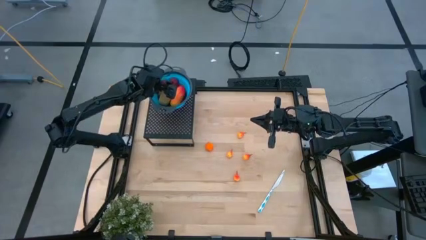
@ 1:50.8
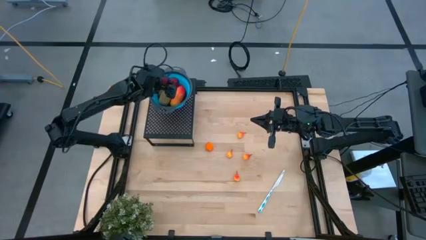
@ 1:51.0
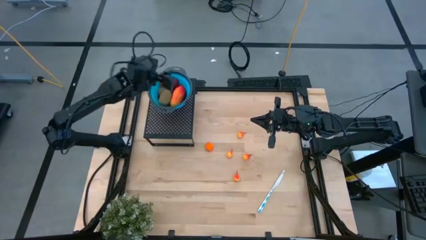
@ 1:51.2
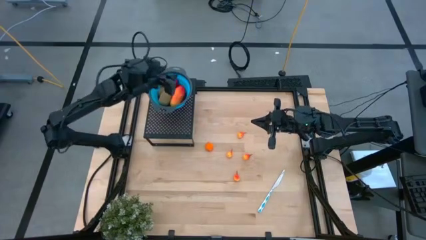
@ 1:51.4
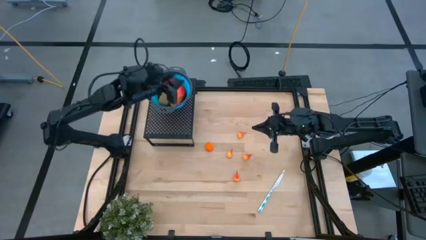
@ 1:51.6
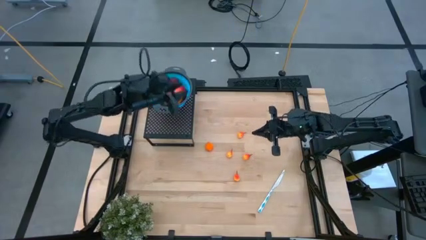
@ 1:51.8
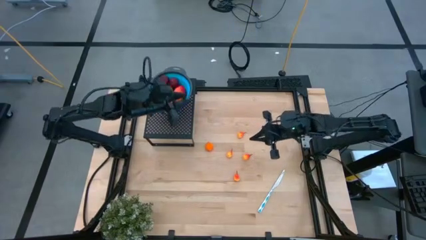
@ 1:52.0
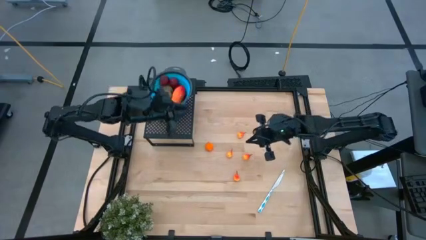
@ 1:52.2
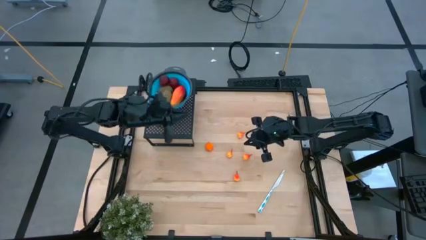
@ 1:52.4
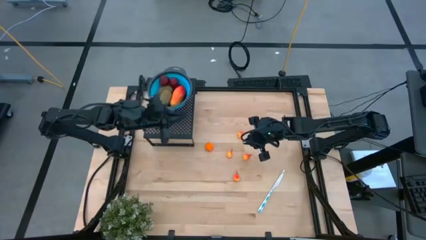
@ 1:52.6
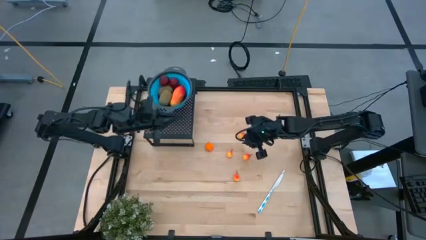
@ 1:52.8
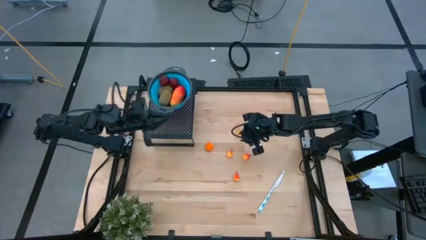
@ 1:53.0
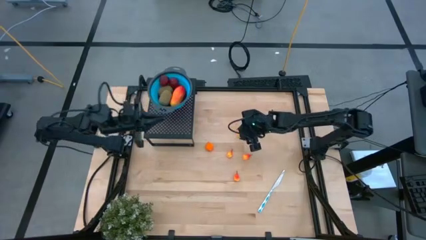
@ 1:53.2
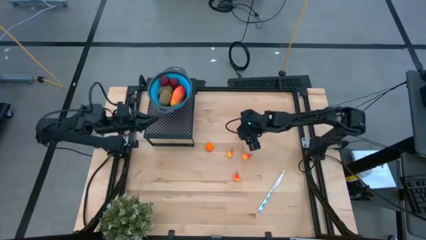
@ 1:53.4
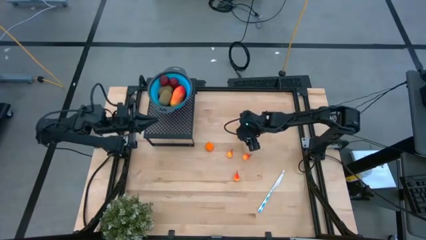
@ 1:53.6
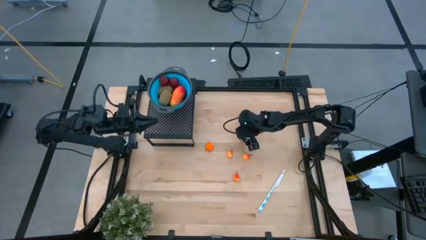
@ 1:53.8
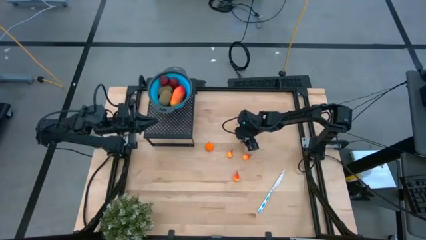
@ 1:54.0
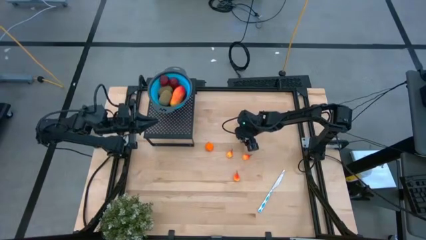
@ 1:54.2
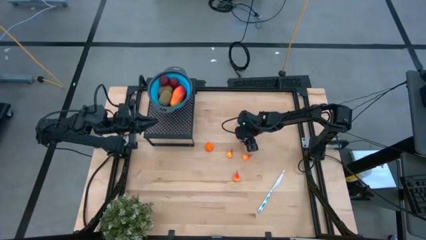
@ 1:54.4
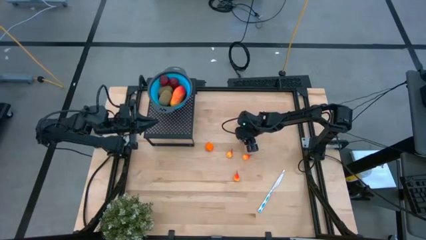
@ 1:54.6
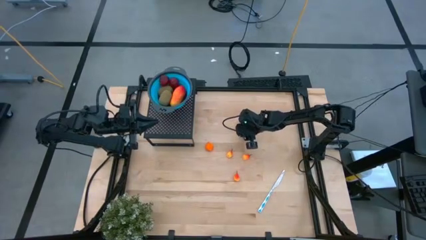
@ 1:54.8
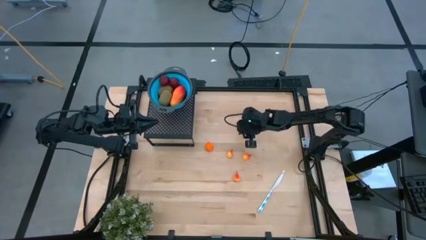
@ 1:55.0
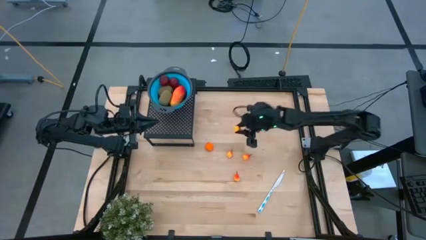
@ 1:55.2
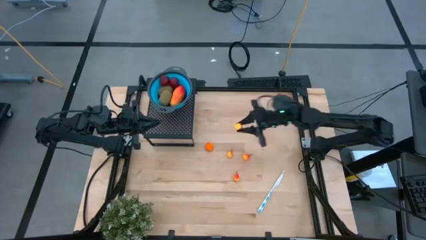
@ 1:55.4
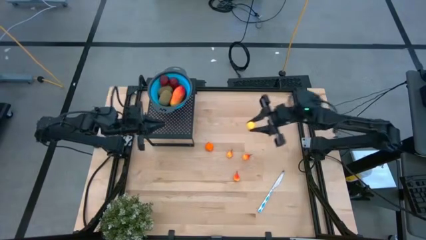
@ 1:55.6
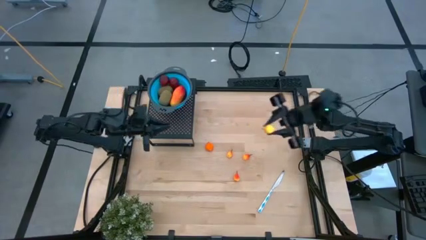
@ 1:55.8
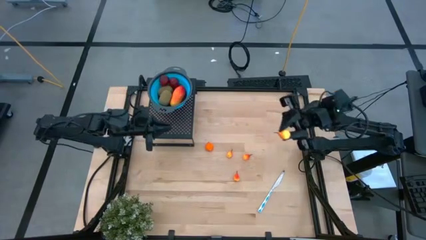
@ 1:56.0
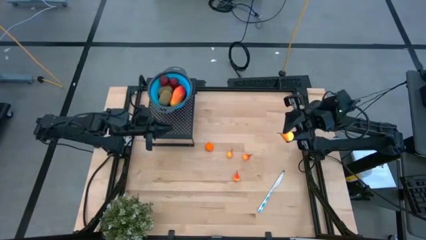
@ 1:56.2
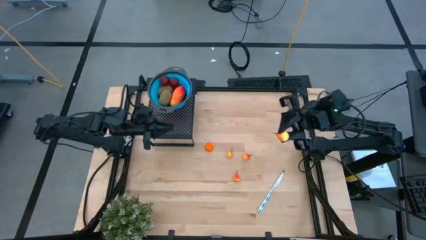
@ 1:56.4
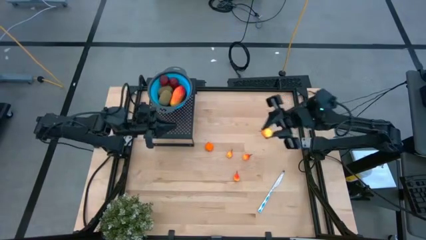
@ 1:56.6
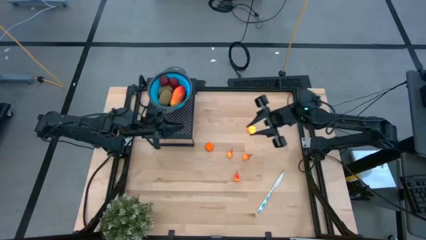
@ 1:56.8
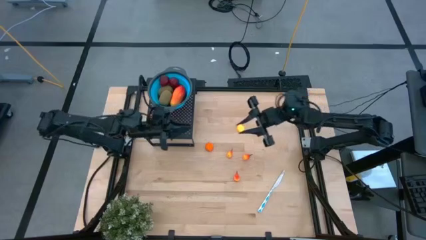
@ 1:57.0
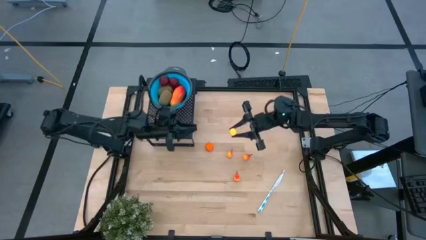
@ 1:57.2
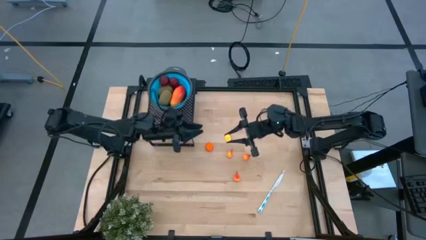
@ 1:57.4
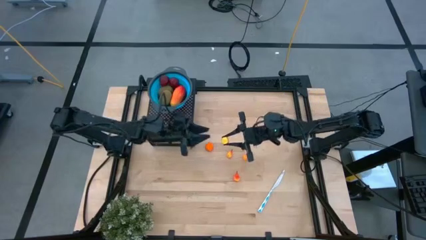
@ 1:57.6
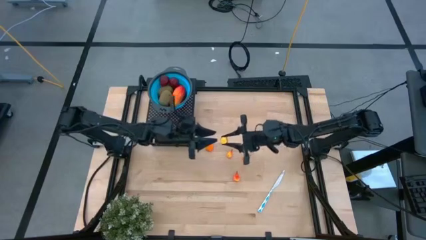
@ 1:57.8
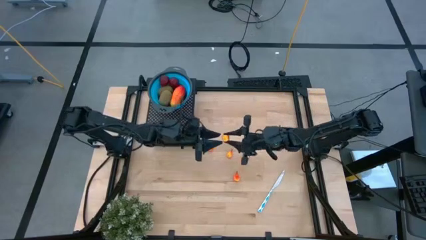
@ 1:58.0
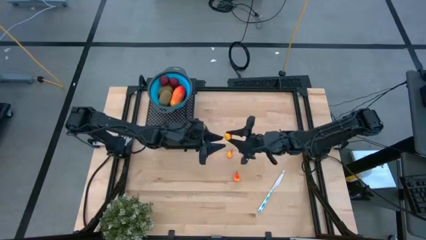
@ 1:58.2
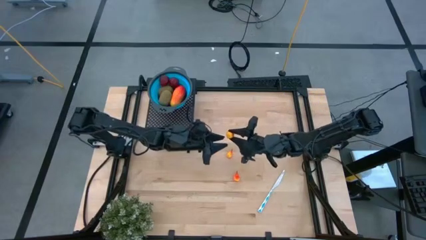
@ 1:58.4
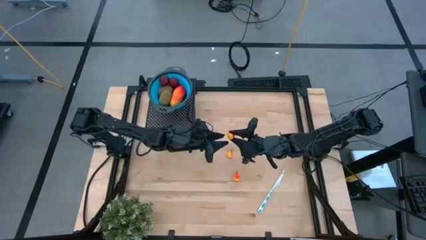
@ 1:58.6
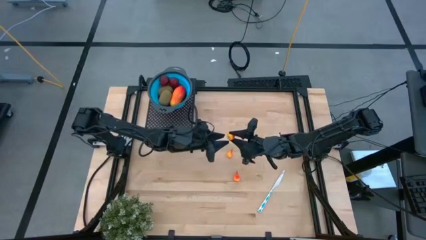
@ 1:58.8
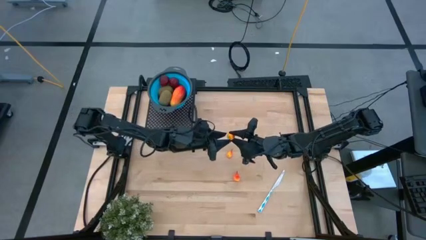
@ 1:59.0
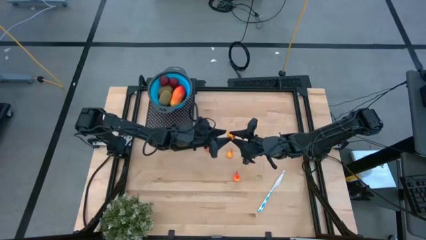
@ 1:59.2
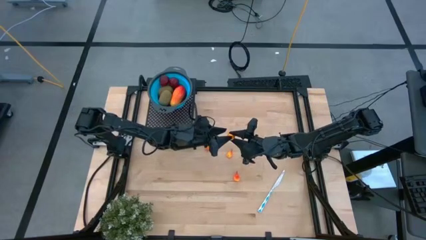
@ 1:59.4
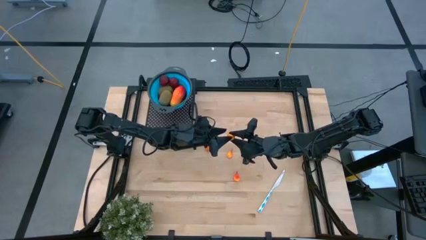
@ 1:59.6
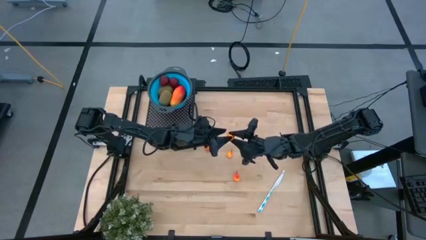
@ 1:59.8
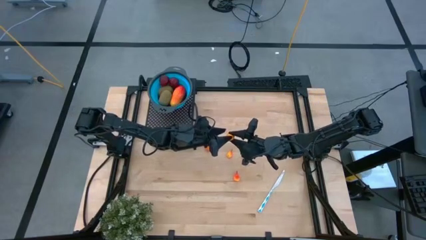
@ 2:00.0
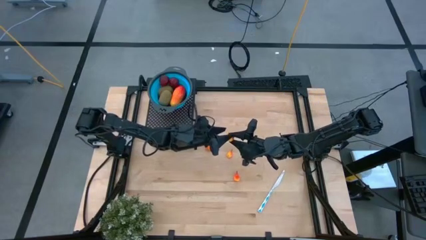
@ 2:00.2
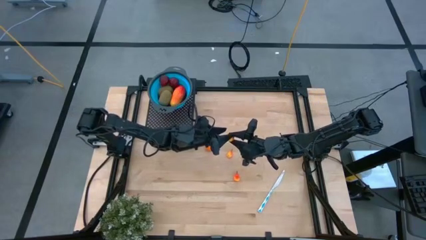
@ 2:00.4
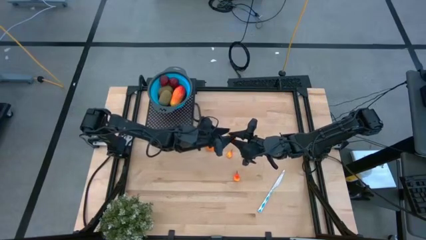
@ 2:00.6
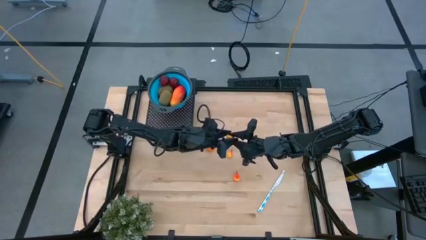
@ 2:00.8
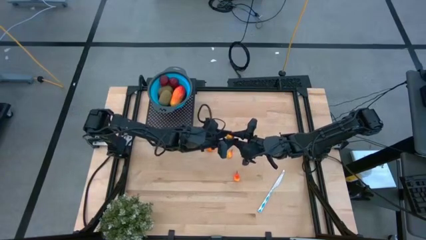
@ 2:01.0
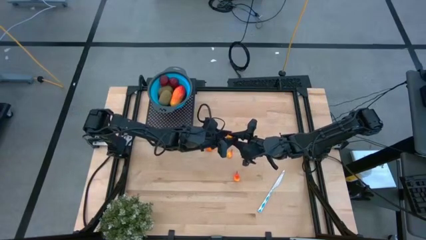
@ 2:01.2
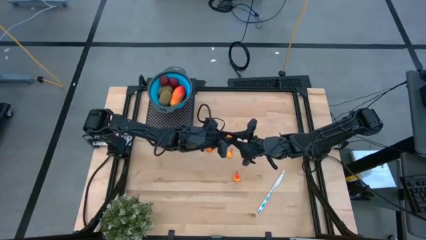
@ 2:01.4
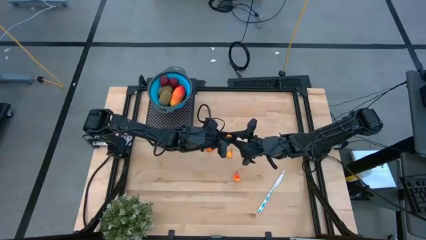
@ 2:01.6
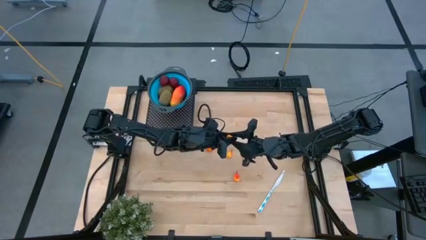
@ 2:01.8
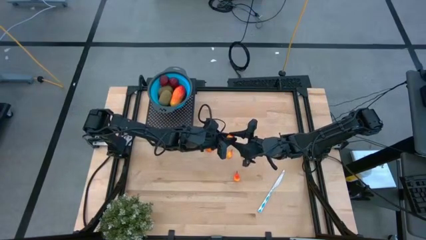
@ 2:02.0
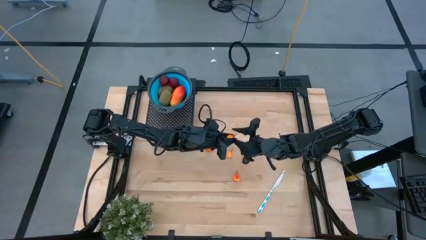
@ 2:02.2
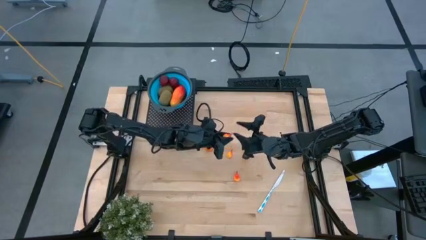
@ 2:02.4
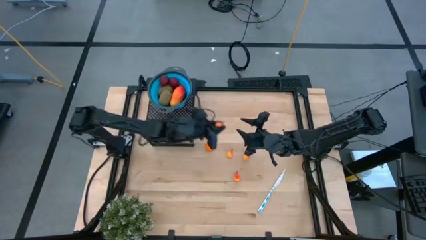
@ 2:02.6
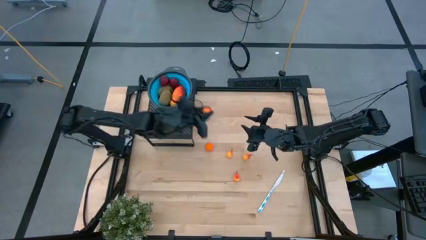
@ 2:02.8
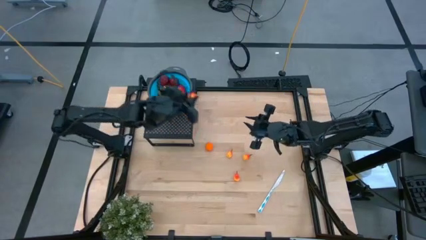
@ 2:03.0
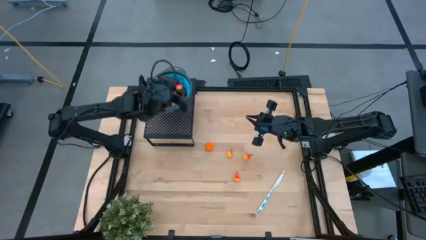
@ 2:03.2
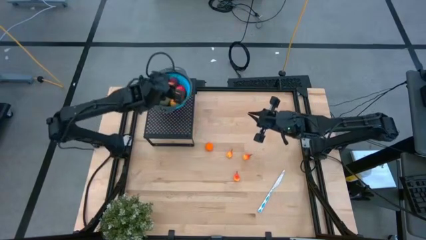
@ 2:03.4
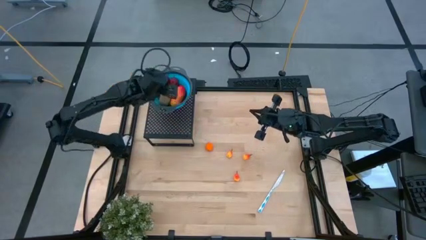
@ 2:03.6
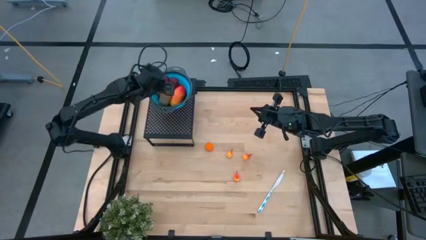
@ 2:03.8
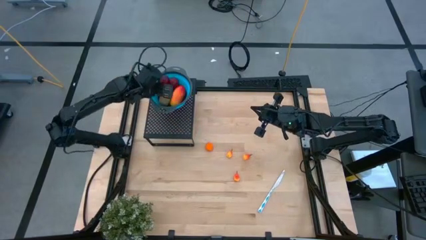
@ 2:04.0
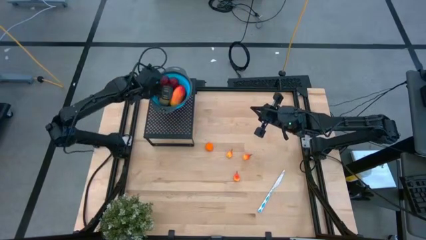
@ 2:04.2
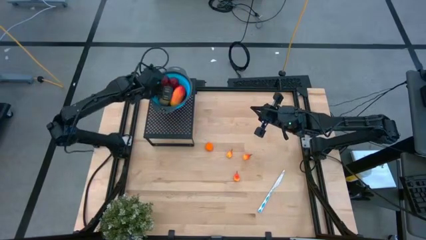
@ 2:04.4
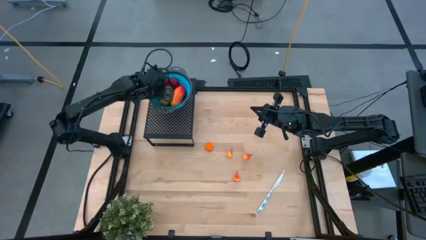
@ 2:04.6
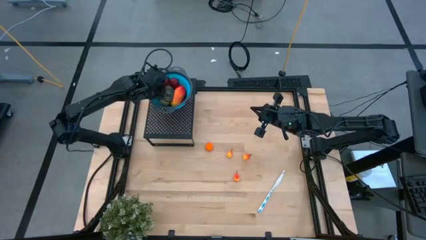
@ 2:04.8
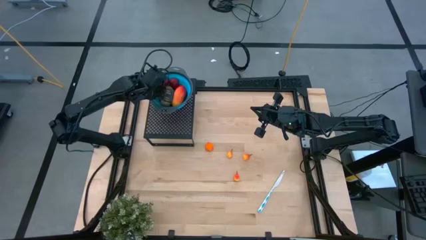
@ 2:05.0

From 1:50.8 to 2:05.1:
Task: Pick & Place Fruit
Put the top peach into the blue strainer bowl on the shelf

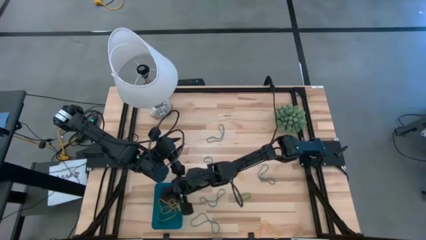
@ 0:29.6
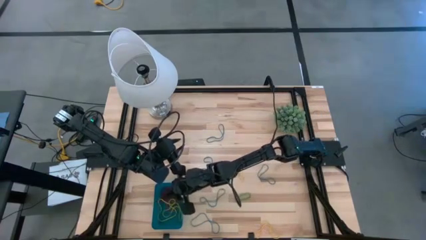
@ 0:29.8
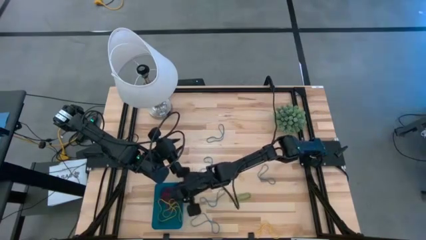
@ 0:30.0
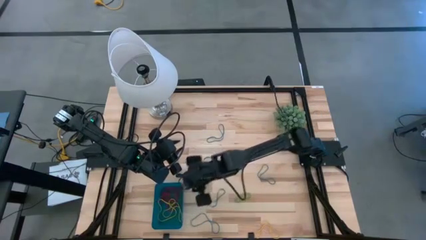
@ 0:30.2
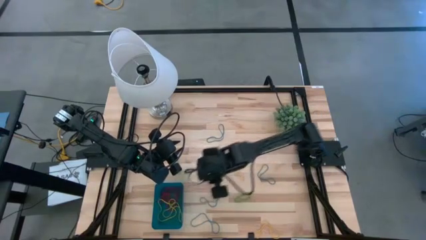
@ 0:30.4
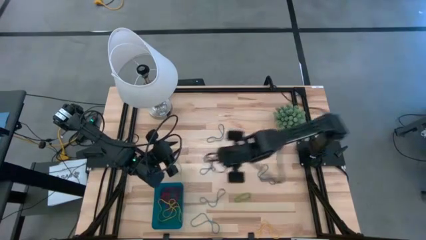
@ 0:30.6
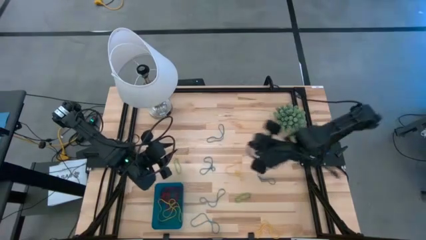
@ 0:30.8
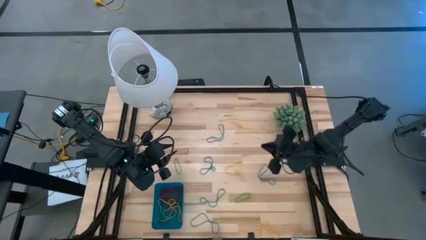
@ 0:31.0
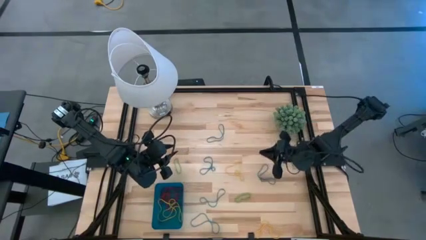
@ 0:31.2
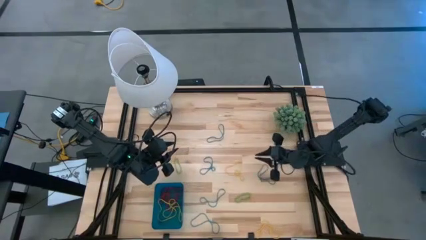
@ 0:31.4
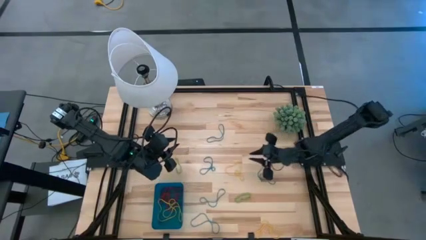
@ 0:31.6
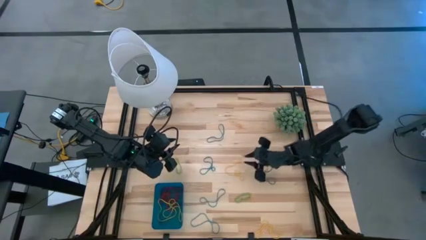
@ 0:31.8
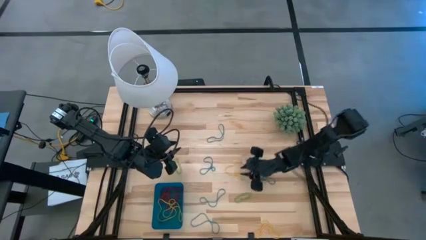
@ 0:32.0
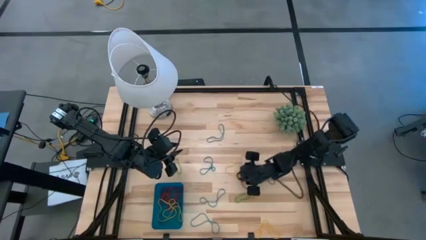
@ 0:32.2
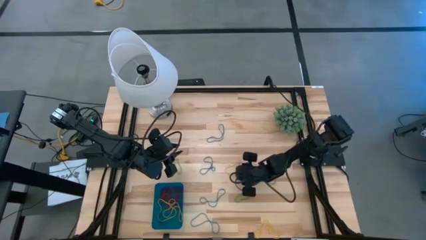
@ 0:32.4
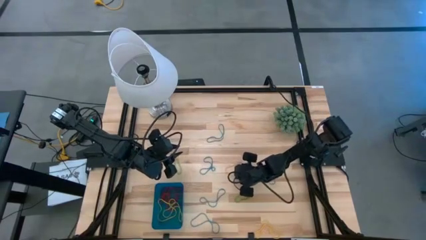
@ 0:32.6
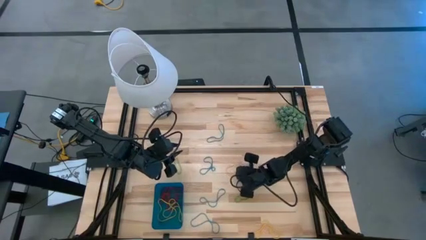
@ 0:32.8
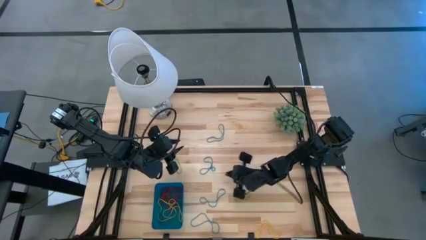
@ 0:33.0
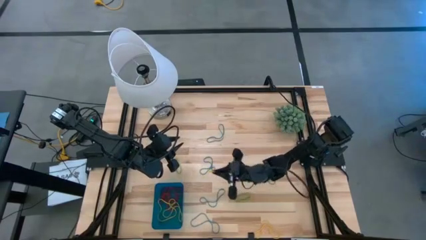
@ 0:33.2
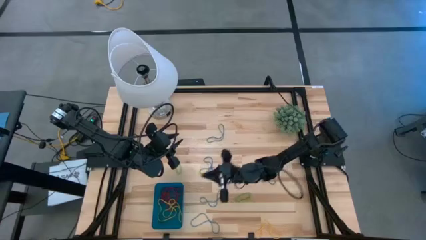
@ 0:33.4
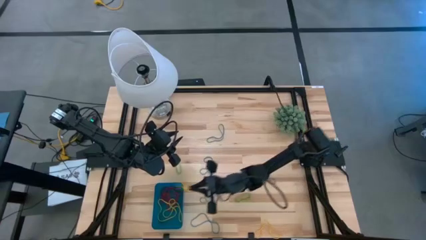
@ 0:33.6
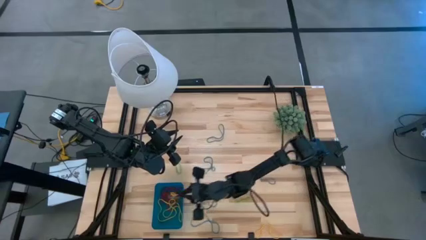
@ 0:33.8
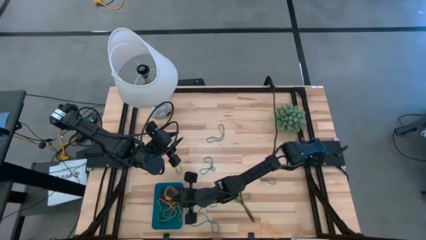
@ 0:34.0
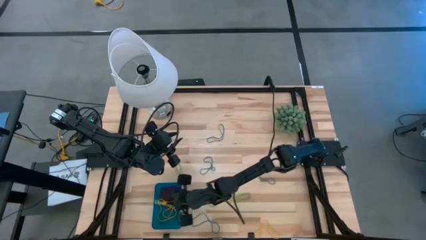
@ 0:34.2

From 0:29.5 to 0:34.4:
Task: Pick and place items into bin
Put the top yellow rubber band into the blue bin
